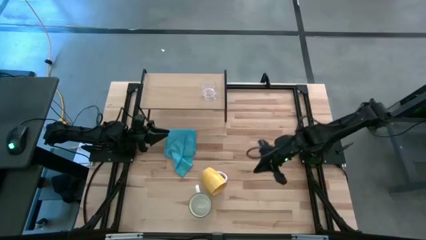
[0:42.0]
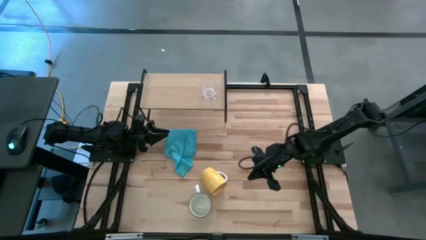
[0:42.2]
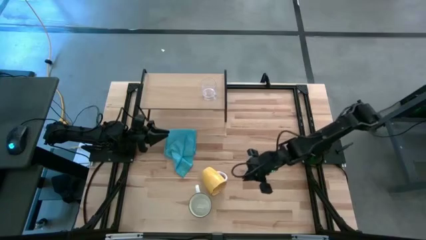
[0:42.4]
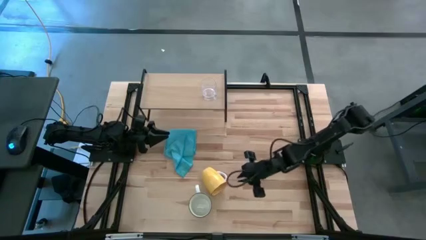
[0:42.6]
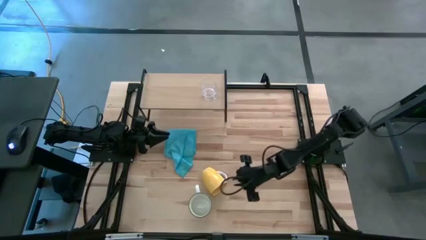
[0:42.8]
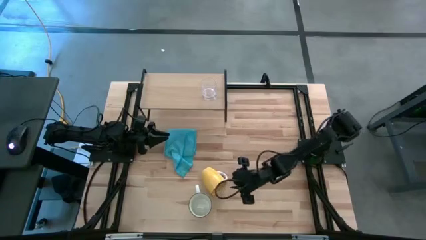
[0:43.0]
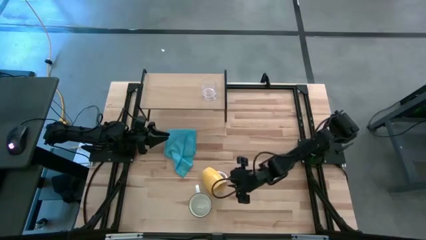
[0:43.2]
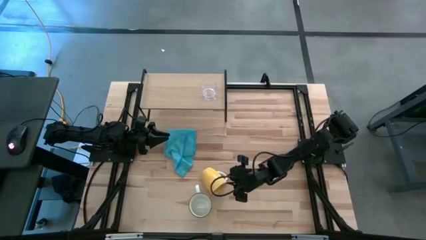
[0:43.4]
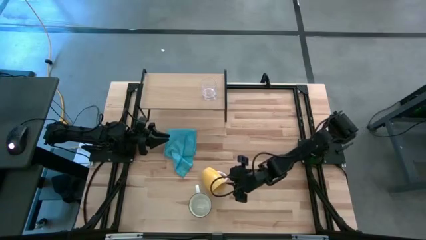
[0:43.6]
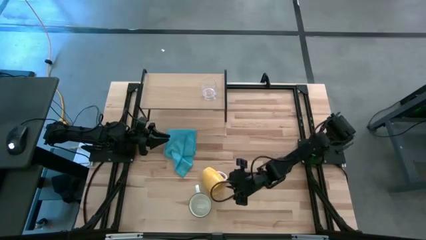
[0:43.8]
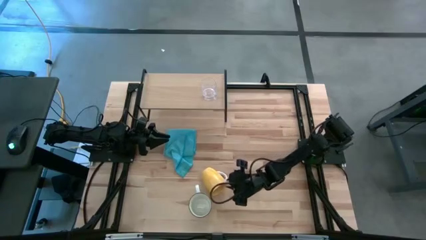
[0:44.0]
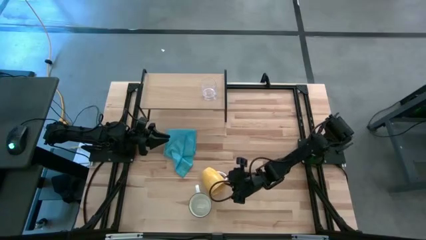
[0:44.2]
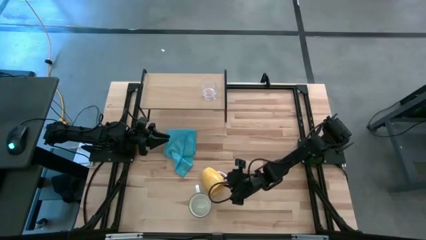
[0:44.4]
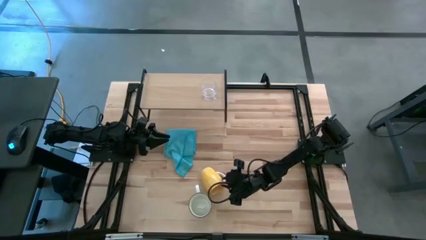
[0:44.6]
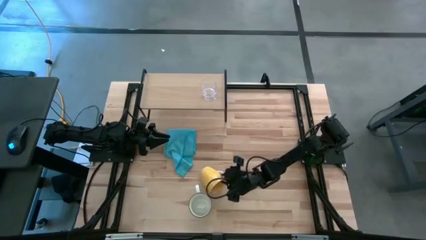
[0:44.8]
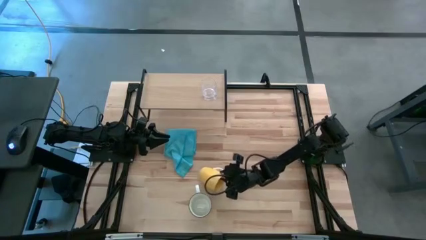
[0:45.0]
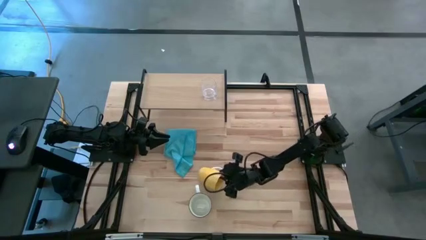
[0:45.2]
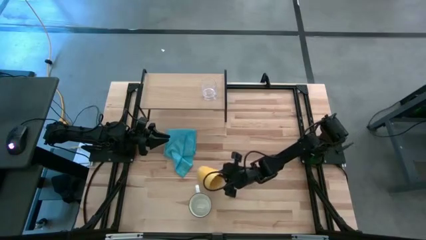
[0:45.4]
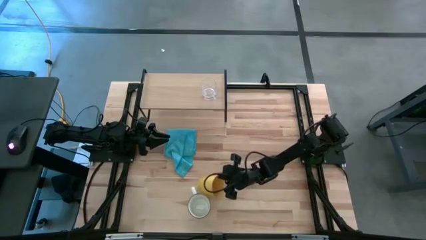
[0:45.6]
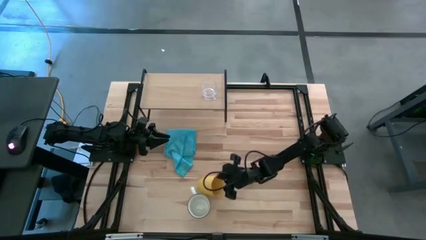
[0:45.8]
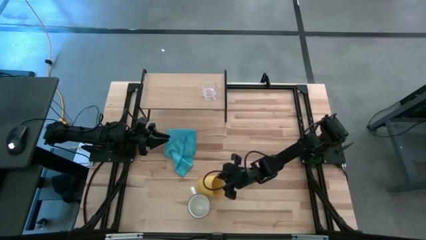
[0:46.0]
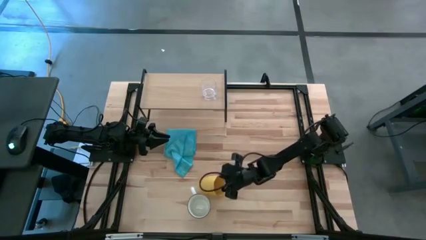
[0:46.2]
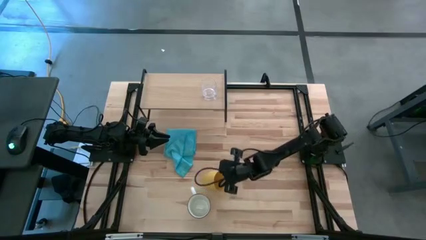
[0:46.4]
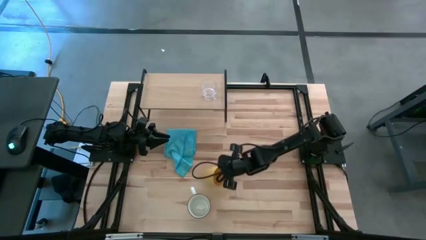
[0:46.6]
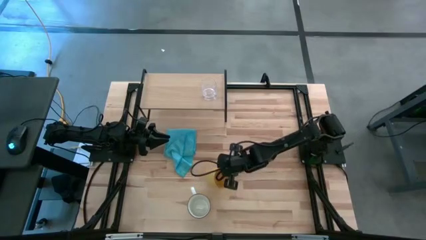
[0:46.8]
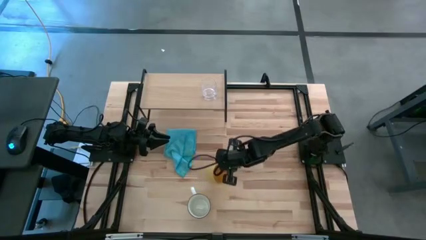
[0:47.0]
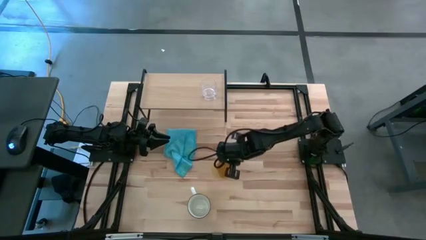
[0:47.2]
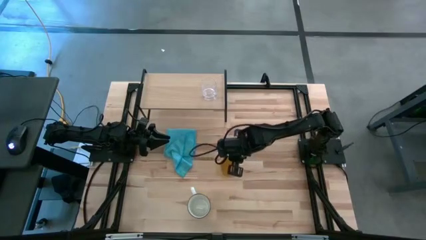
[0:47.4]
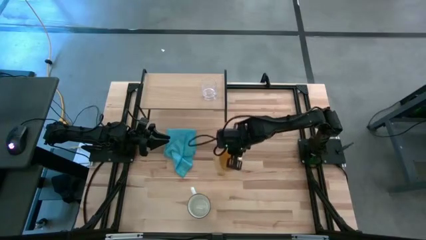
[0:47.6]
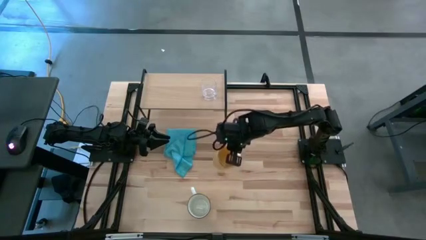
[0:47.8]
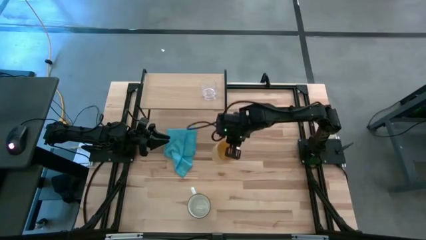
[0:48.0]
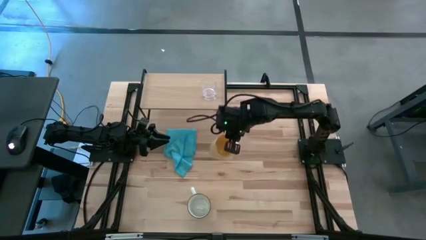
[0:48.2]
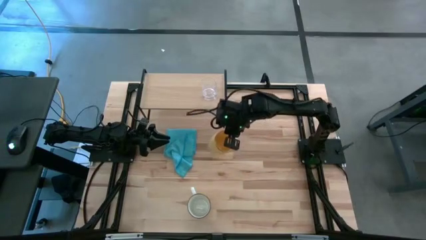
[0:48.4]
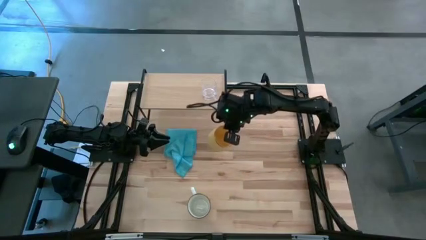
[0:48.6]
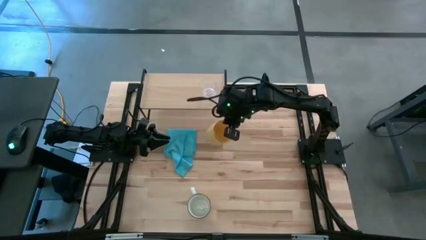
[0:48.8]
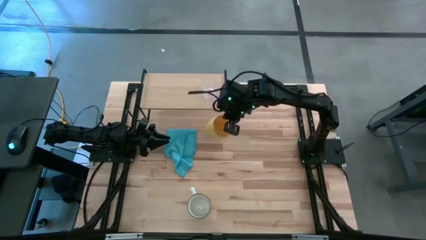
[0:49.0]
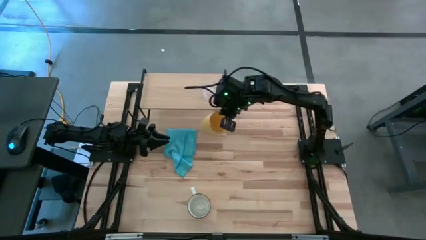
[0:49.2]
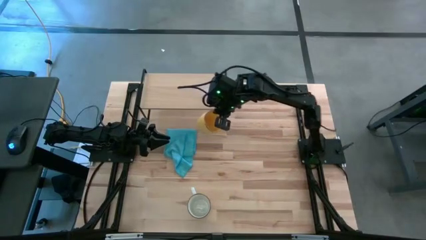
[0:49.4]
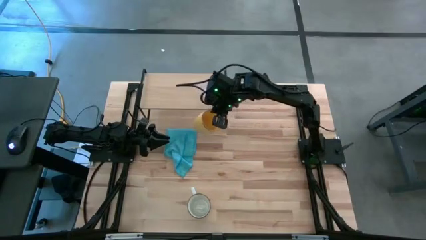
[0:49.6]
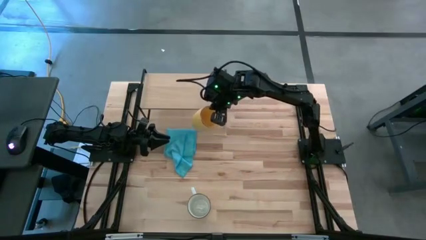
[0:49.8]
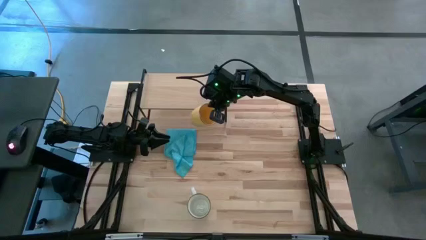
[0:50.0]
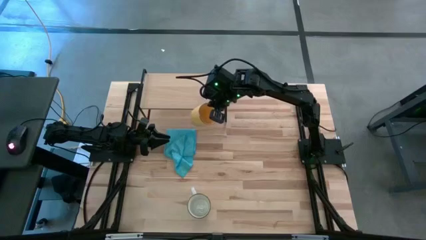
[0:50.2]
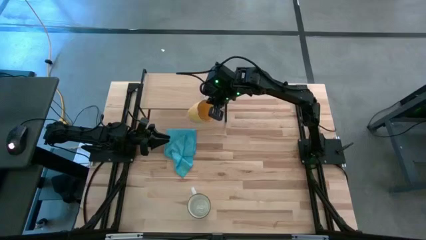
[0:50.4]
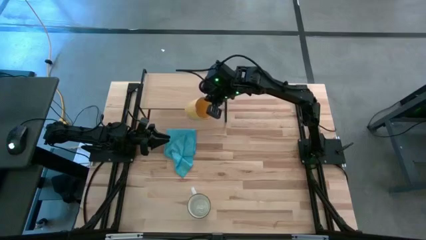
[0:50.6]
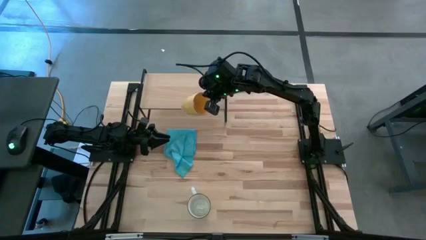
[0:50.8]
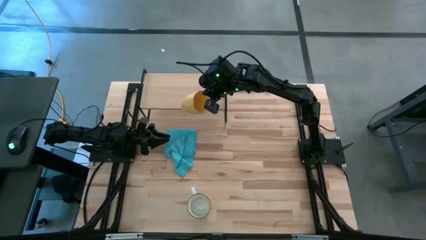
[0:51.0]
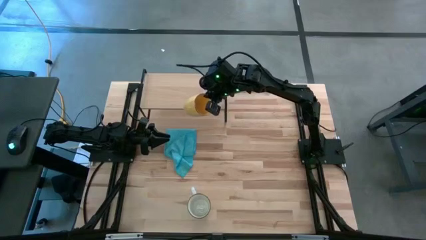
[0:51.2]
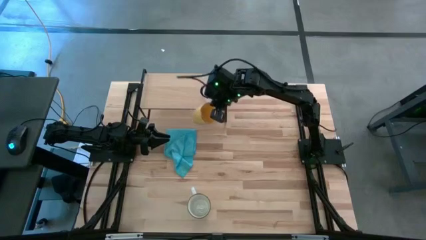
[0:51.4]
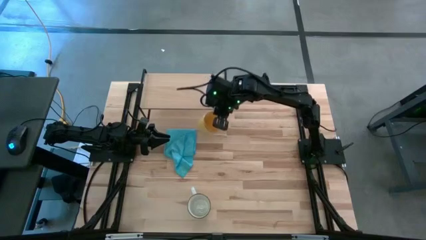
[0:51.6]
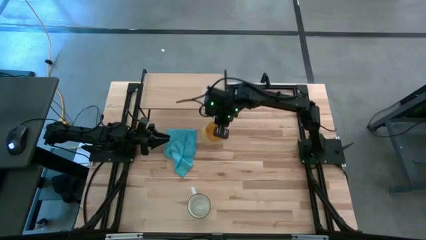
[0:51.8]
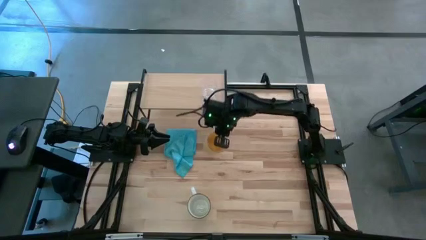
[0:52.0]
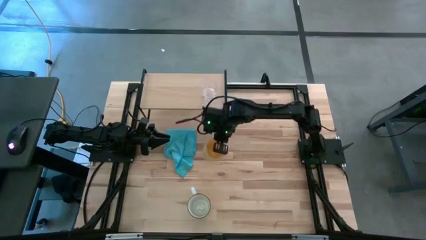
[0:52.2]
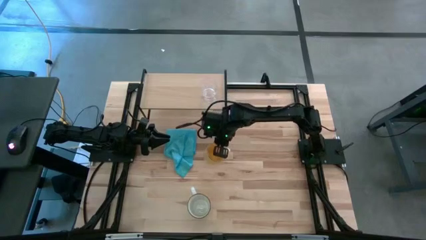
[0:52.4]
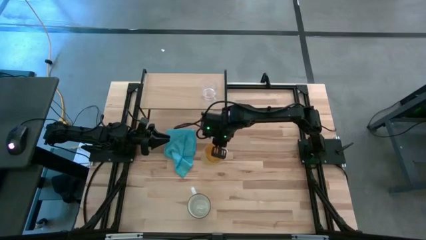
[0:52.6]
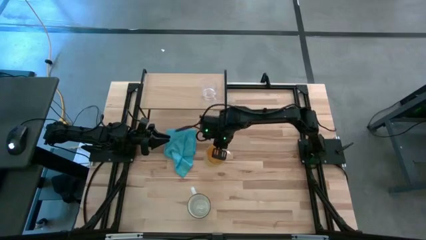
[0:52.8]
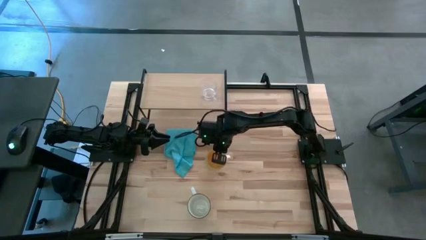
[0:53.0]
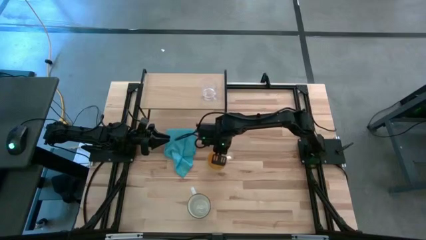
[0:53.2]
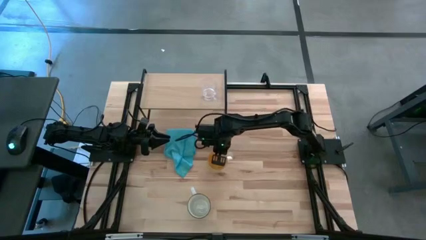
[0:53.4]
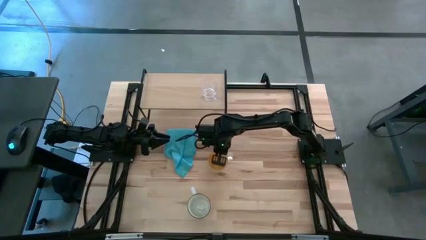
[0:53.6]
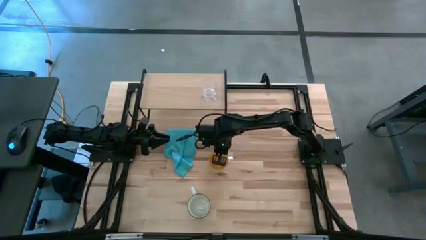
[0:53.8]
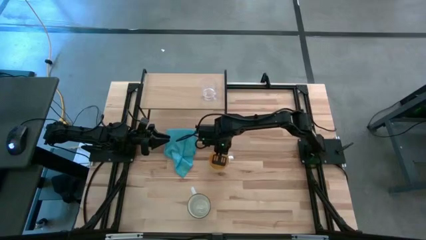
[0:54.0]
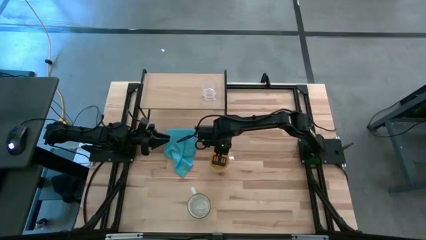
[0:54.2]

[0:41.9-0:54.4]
Task: Stack small to large cups/mugs on shelf
Put the yellow mug on the shelf
